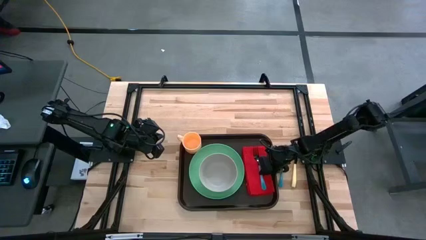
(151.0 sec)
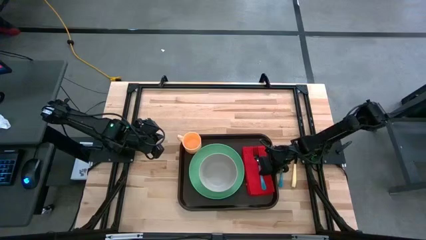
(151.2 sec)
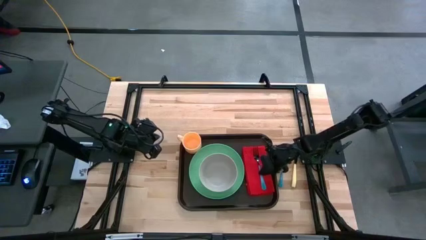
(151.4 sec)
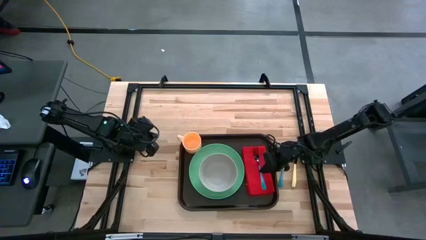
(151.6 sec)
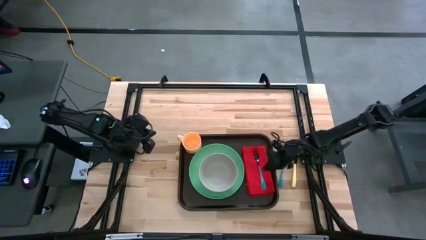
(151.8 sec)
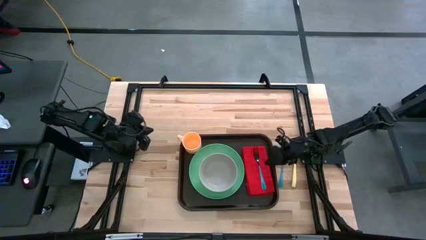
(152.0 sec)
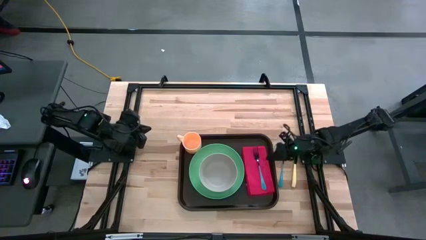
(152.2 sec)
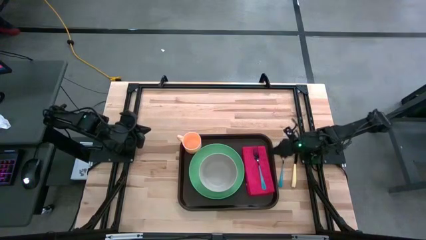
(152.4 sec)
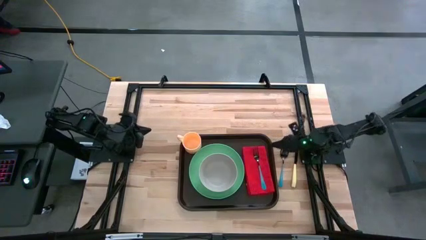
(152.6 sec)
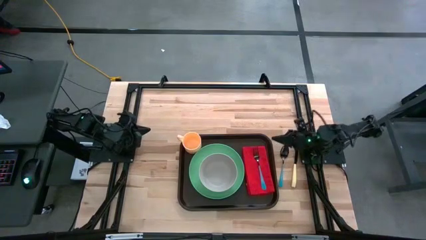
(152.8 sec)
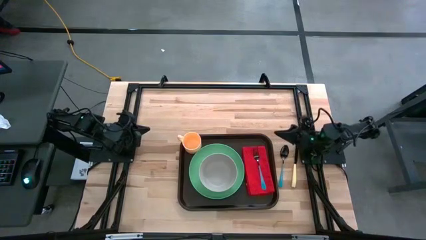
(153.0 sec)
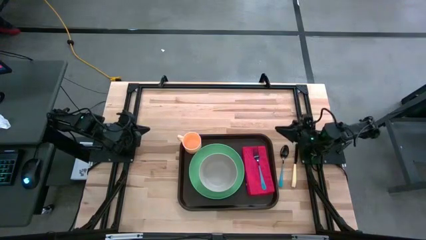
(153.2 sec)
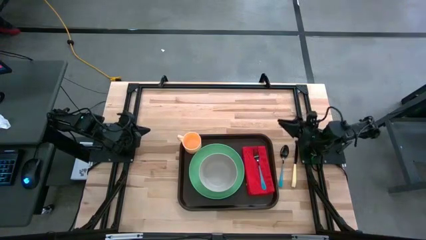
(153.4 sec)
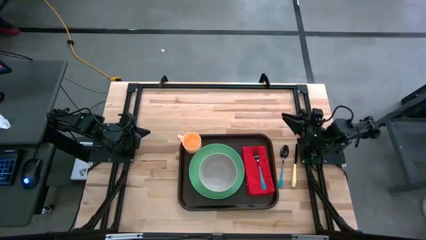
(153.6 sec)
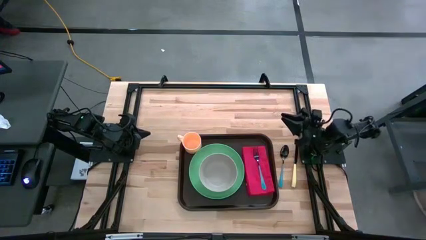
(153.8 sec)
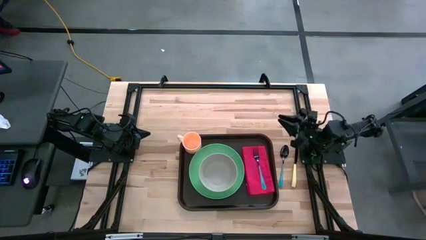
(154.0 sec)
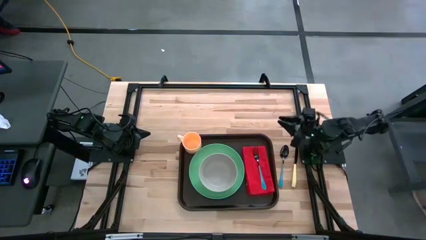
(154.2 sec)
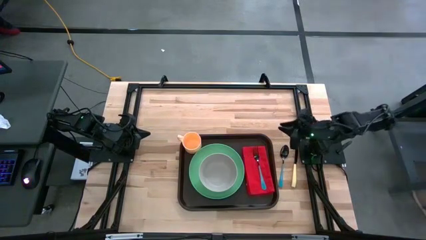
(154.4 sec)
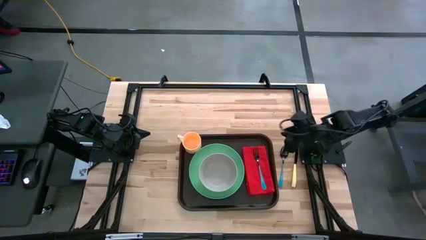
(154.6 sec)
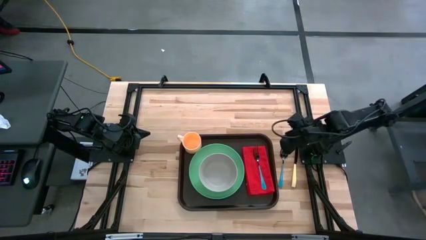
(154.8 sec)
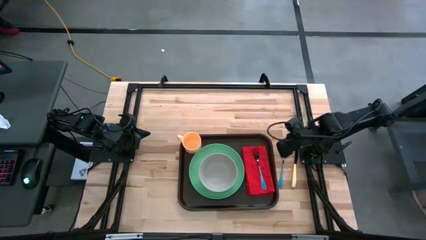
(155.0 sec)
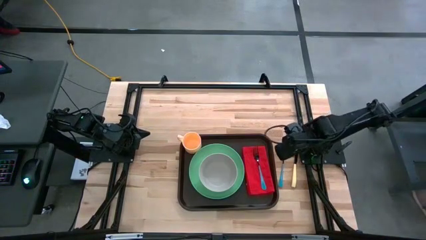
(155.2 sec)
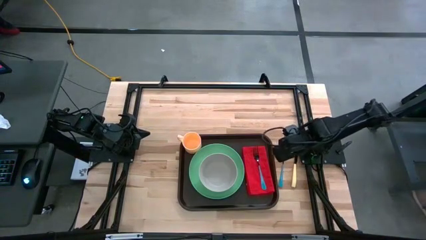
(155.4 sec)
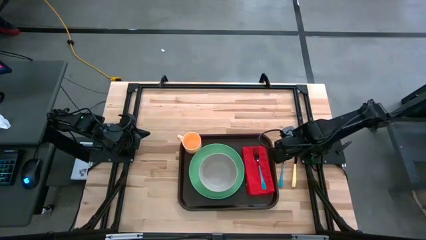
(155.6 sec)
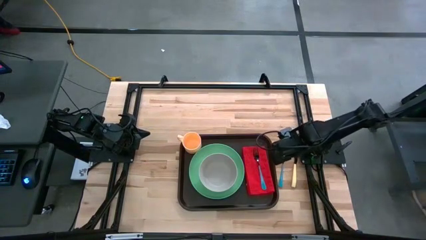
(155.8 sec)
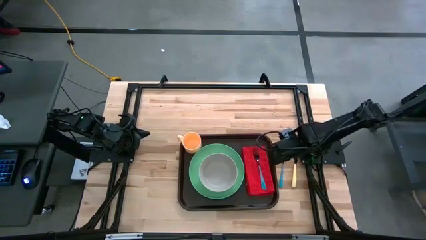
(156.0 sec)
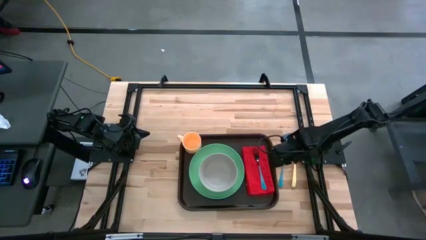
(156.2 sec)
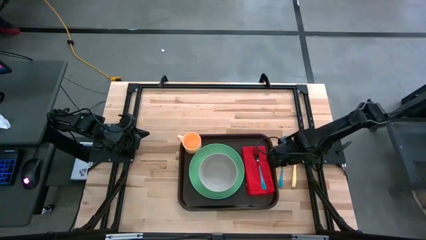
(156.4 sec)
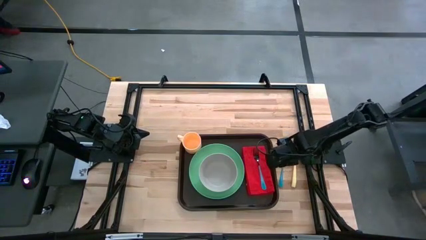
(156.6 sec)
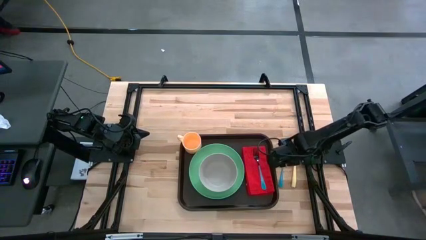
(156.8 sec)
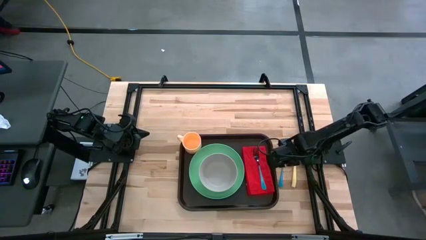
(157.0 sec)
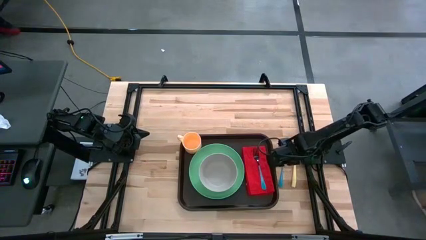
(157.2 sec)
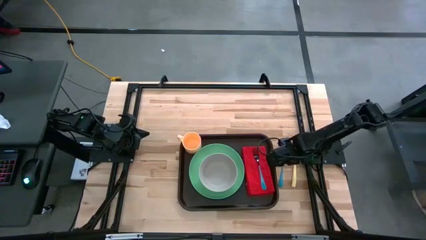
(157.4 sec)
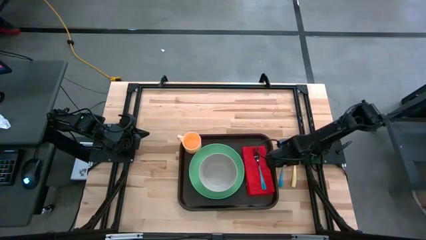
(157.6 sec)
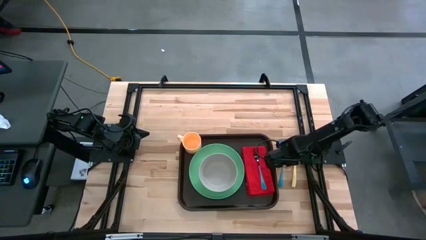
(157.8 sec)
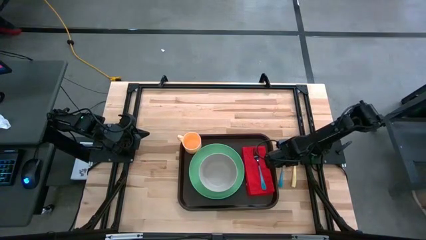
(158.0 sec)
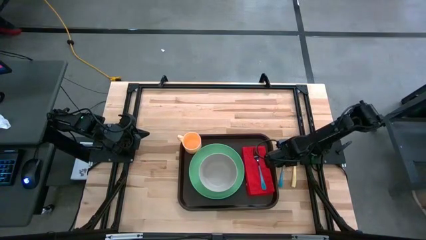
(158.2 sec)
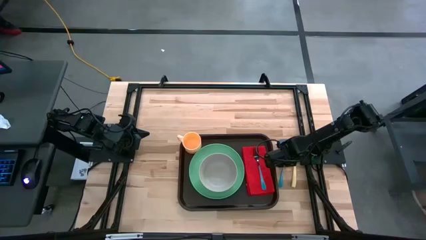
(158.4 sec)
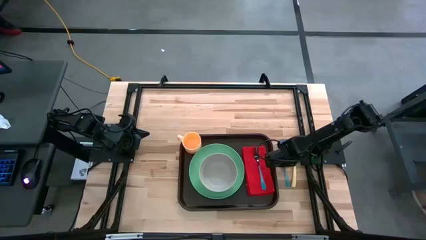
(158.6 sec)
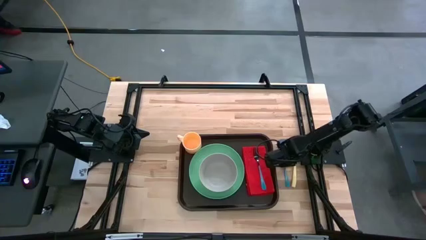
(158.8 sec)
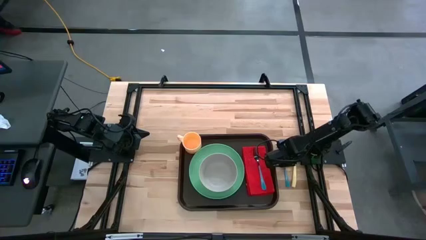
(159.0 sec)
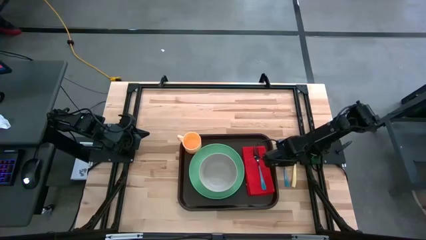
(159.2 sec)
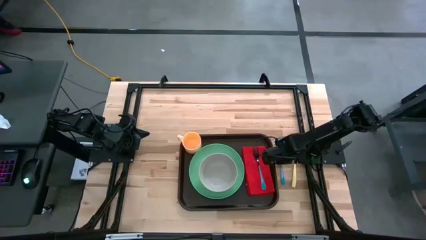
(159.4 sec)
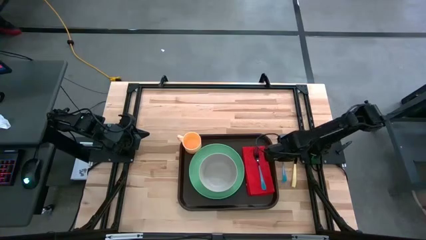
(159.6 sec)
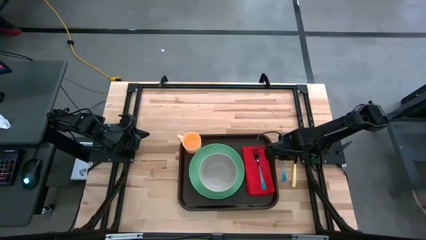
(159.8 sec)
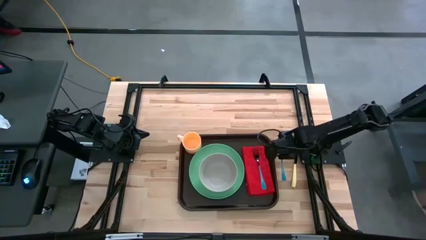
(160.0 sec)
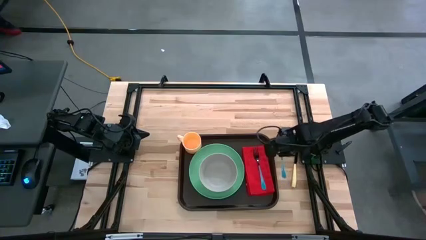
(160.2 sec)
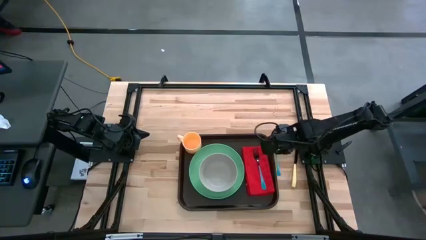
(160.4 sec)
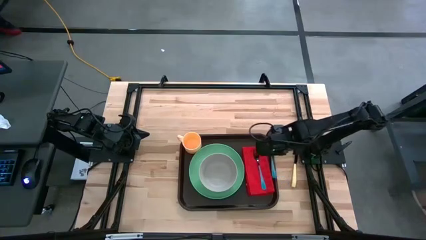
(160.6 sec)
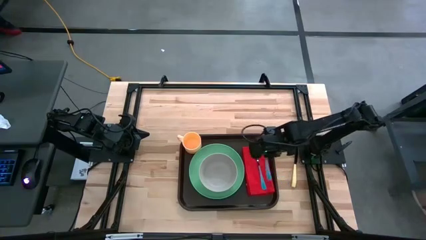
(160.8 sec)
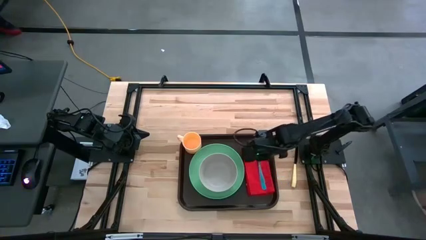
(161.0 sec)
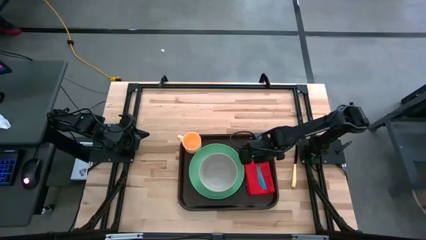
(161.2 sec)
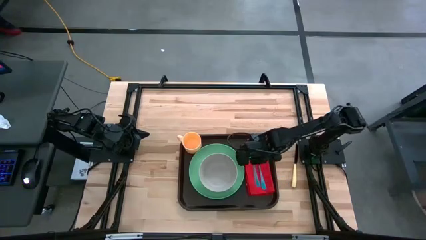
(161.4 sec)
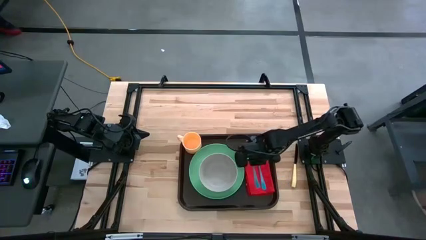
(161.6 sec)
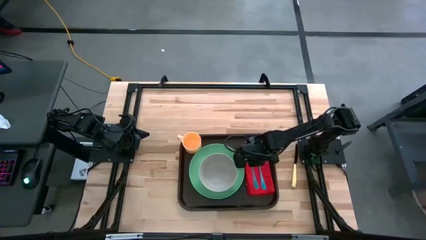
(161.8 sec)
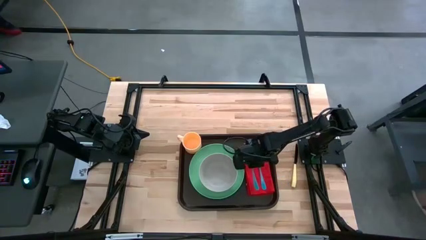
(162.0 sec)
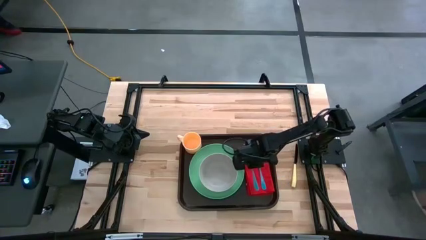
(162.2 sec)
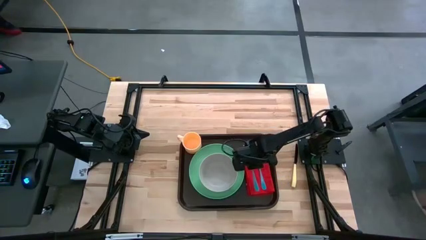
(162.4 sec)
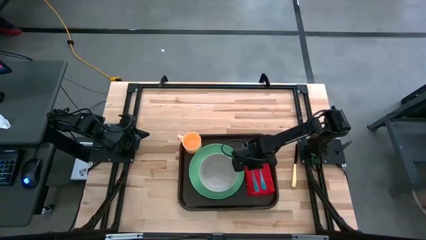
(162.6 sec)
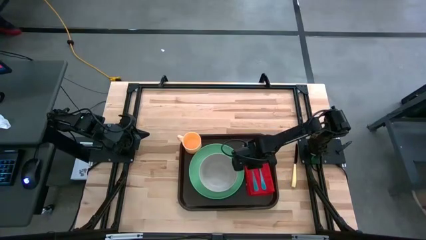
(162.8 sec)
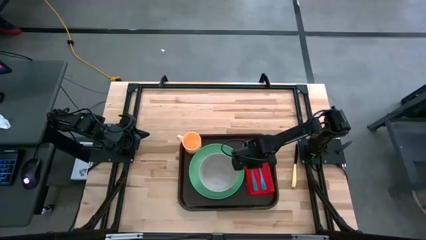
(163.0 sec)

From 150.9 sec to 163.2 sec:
Task: Set up tray
Put the blue spoon to the left side of the blue fork on top of the table napkin on the brown serving tray

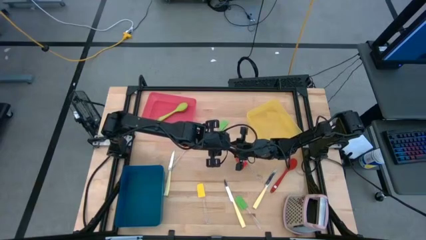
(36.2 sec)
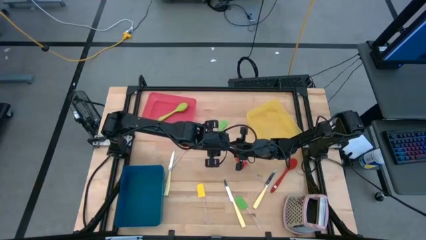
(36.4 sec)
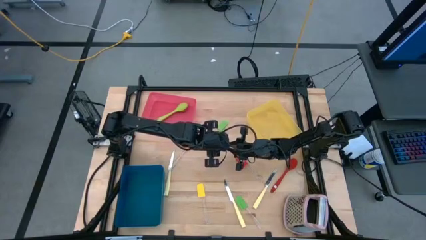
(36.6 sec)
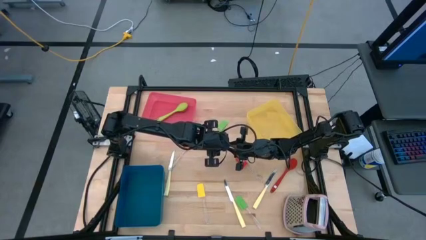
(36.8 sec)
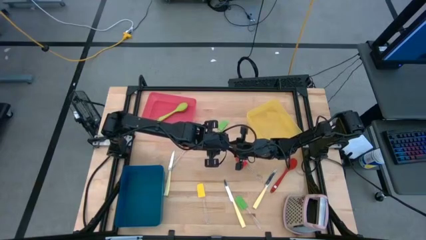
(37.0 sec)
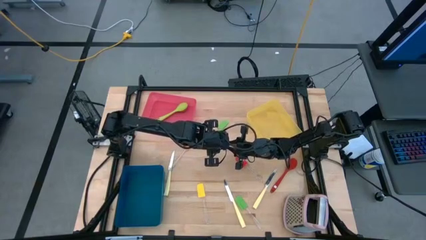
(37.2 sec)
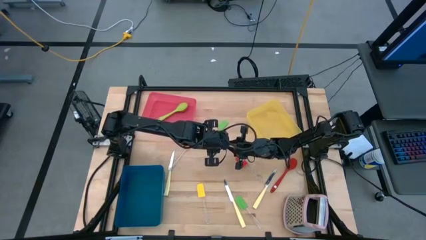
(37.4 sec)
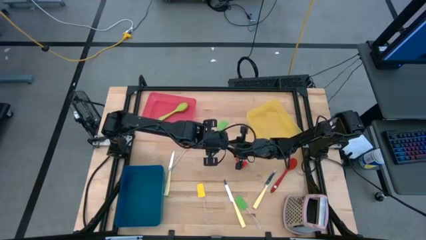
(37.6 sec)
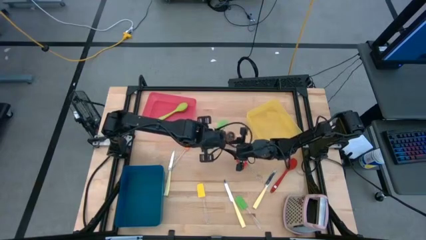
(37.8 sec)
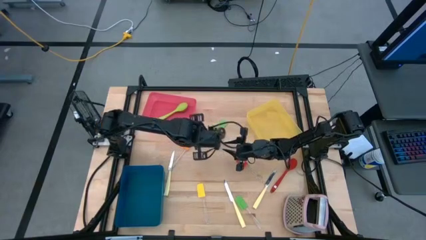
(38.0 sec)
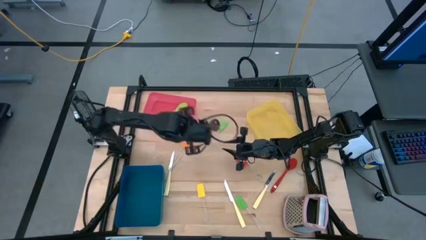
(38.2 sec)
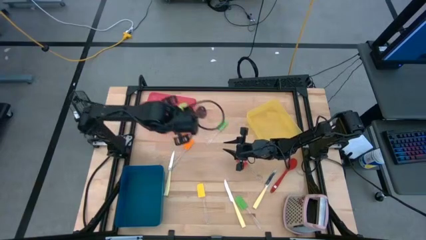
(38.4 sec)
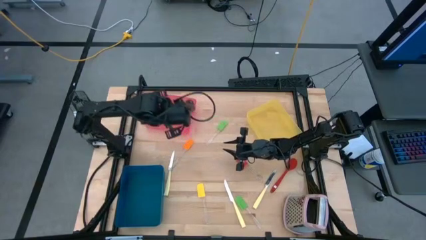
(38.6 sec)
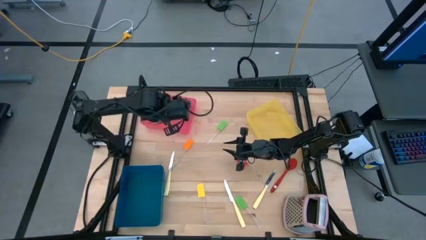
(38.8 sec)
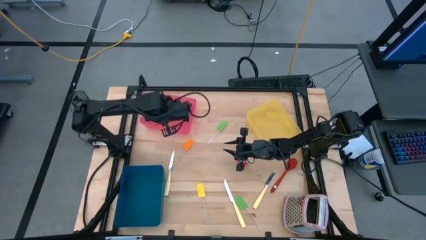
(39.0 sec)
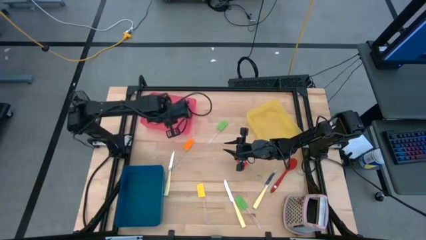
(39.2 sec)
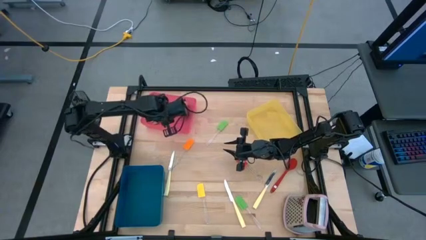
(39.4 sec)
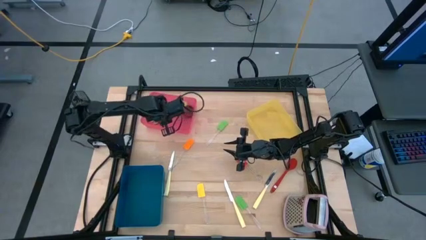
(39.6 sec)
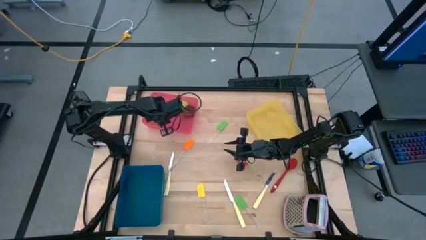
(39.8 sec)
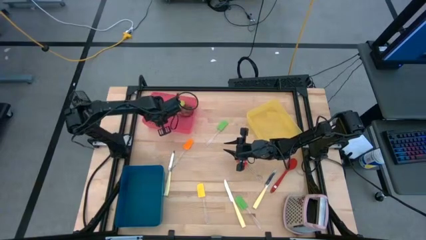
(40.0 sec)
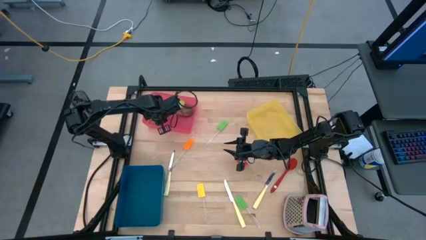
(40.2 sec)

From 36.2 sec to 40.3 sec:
Task: Pick & Place Kitchen Items
Put the brown serving spoon into the red bin
